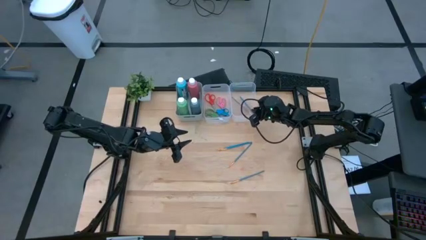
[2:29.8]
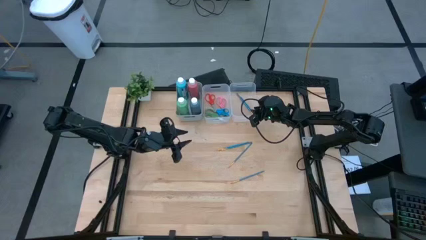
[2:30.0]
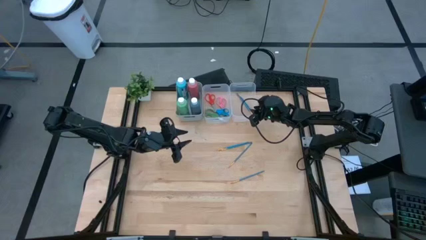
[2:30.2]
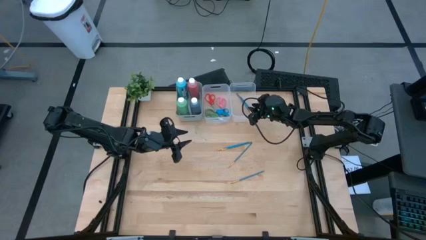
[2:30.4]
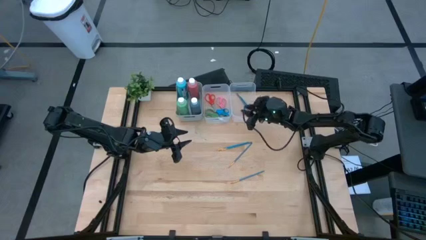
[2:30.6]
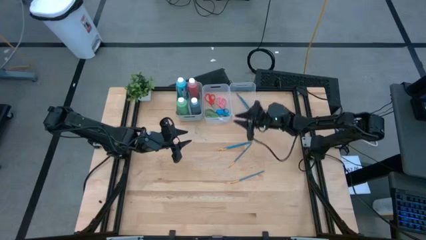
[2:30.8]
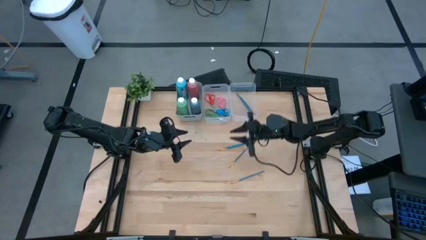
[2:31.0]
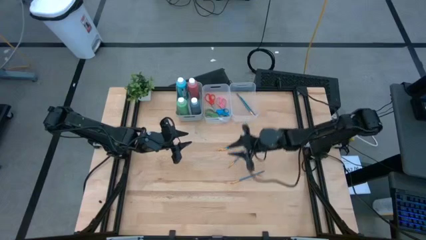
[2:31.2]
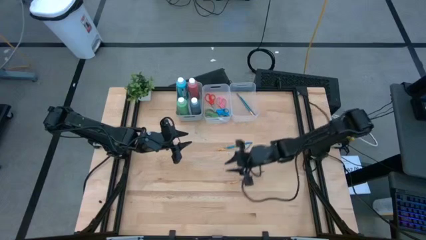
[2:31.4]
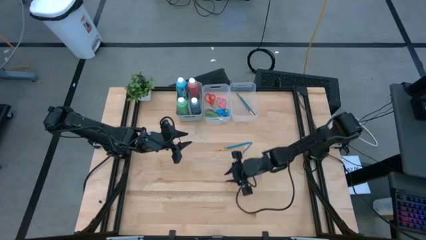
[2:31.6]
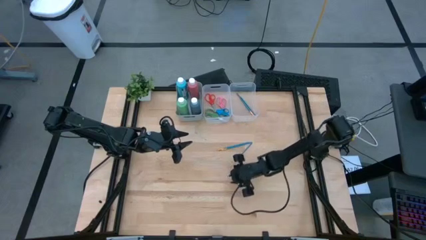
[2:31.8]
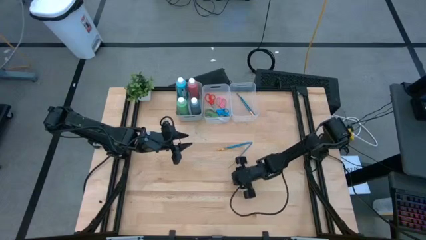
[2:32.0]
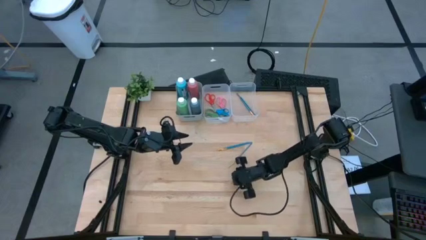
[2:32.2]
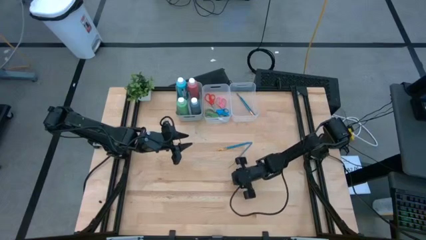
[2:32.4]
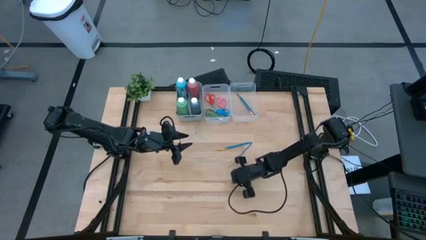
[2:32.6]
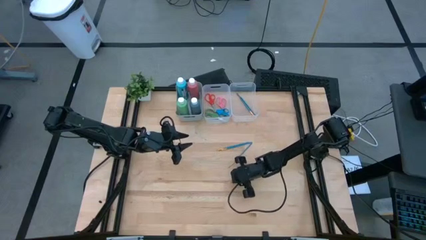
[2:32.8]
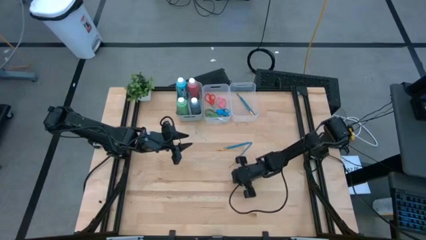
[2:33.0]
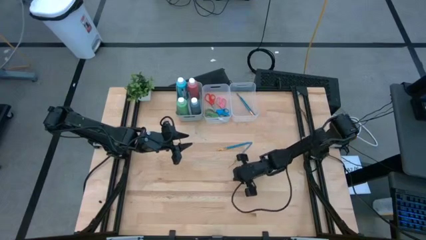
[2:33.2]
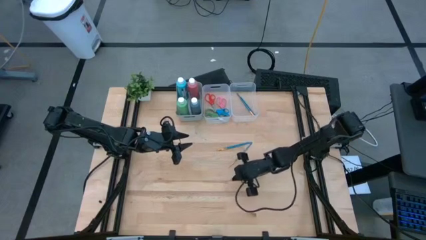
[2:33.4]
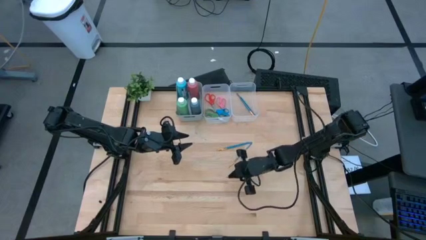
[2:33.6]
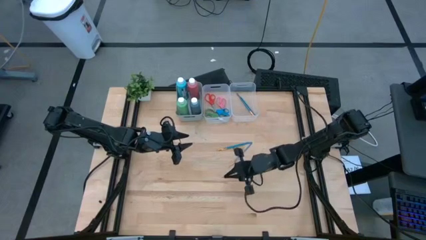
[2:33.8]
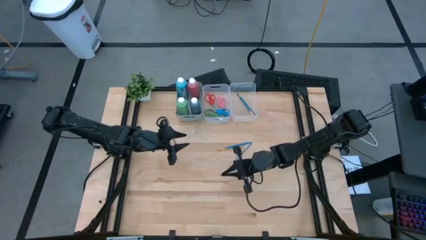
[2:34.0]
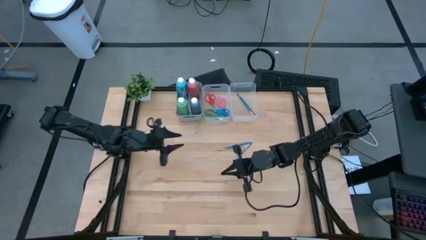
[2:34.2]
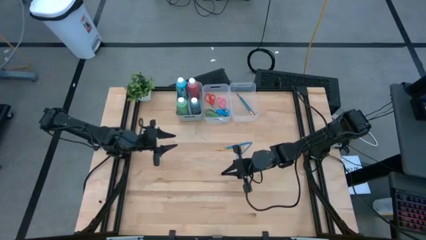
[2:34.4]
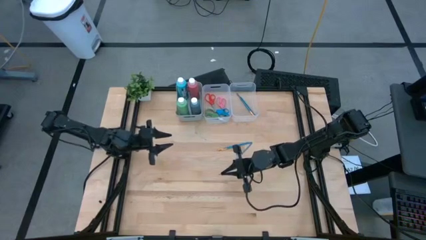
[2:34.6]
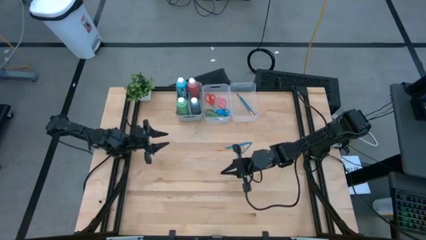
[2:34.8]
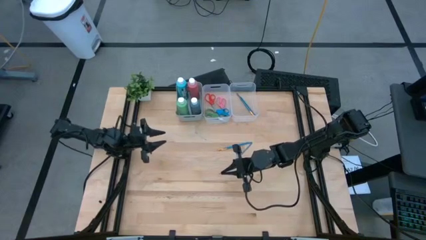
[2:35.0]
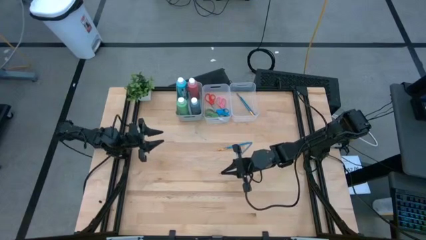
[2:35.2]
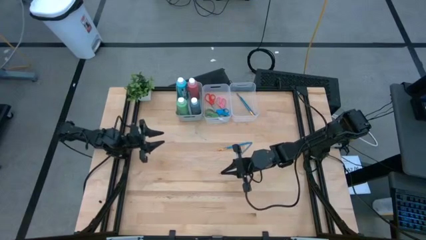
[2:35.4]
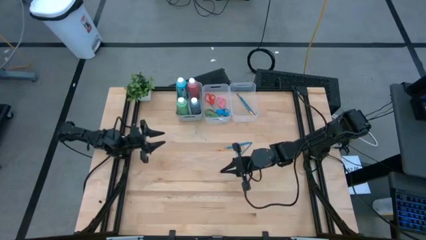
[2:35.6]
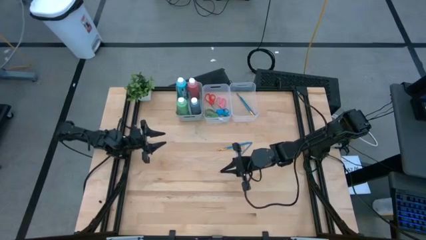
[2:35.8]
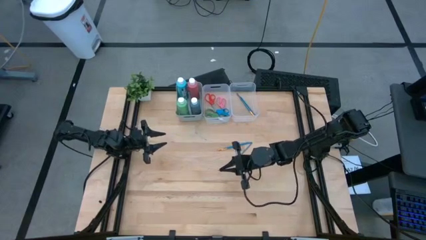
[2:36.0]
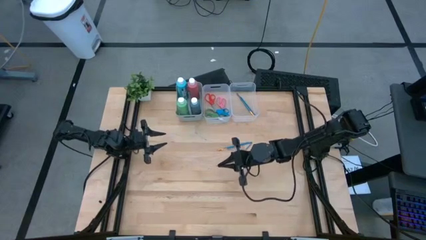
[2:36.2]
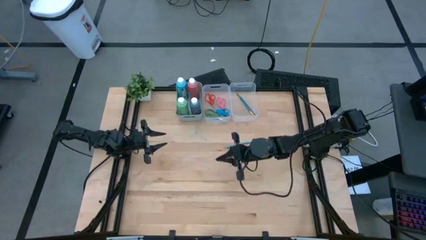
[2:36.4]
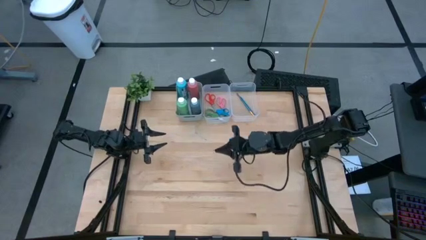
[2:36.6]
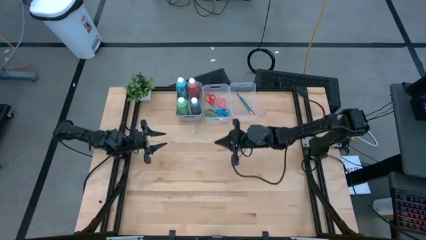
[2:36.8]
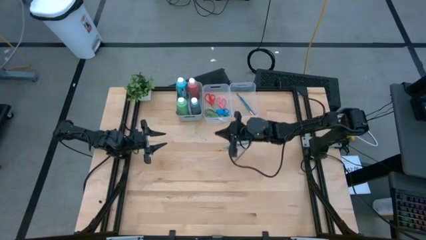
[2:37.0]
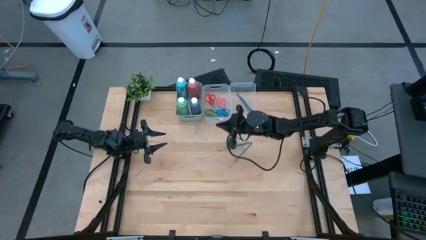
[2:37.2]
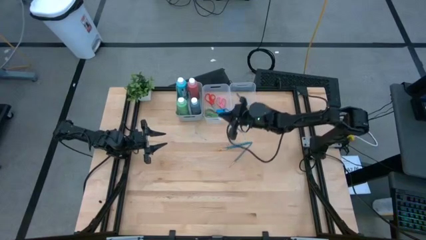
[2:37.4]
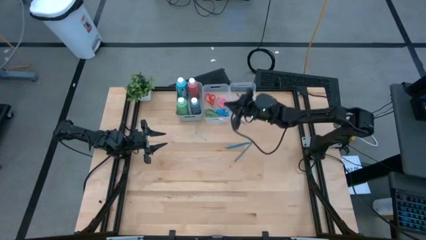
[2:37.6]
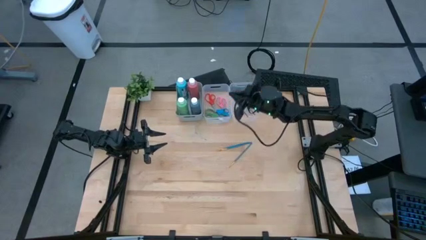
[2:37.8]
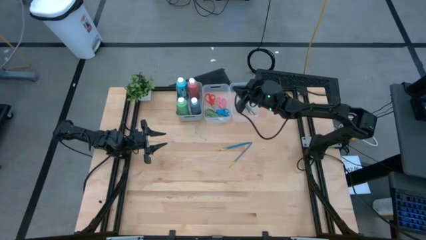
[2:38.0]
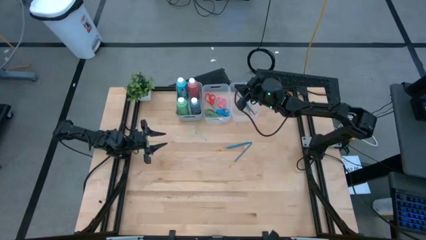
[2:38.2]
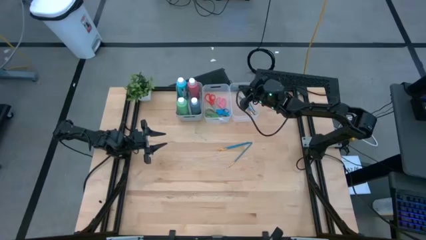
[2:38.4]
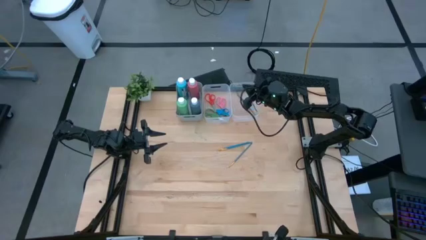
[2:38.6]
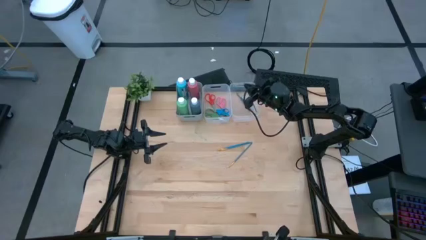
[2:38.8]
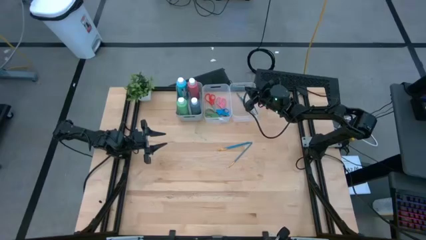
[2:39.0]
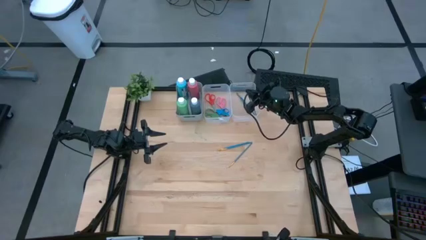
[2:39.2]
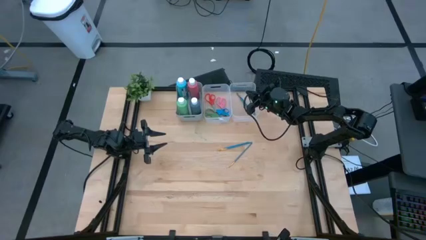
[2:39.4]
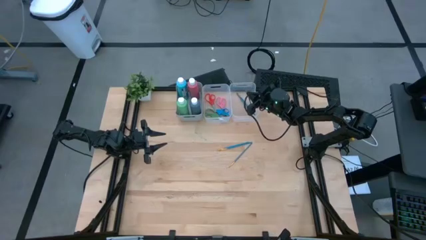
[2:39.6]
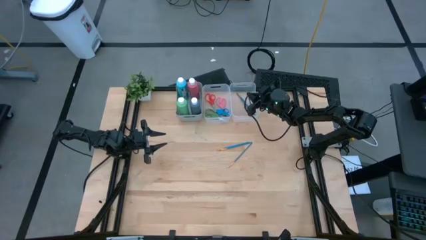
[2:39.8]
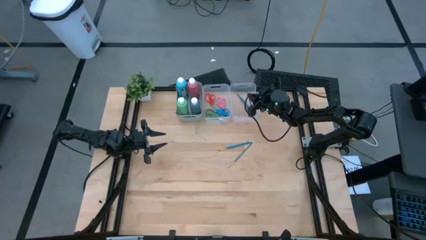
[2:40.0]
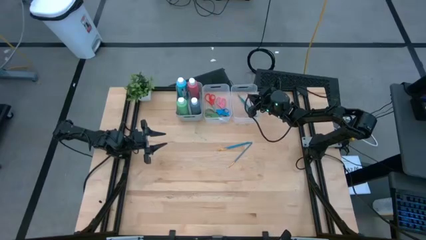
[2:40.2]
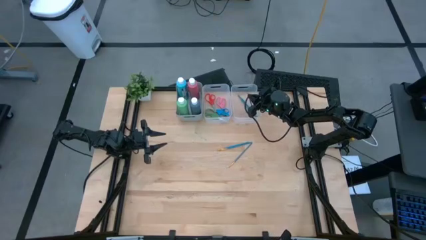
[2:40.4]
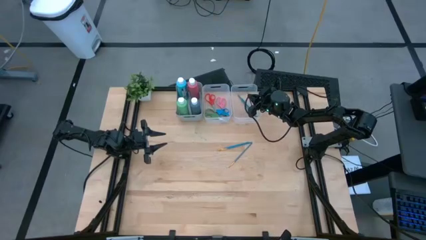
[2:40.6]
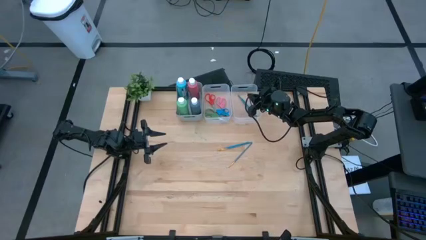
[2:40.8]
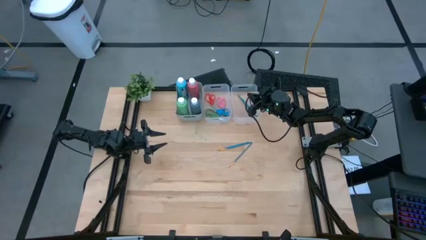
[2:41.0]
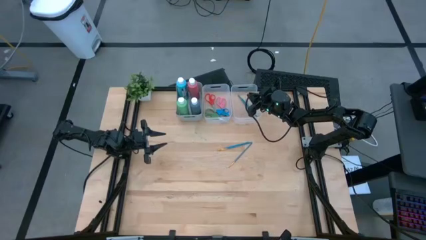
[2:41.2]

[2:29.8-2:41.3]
Task: Pick & Place Paint Supplies
Put the blue paint brush into the right transparent bin

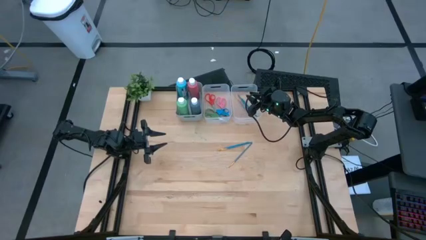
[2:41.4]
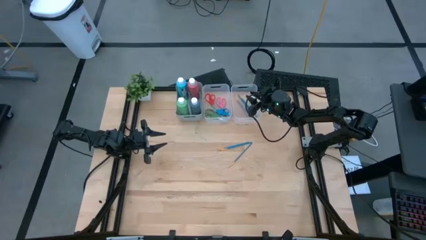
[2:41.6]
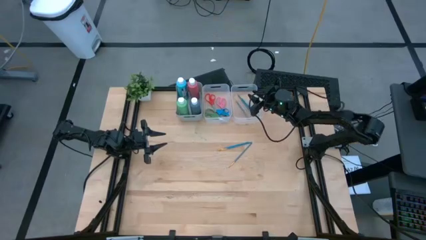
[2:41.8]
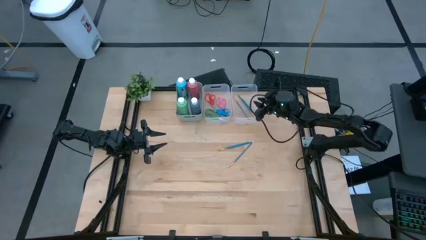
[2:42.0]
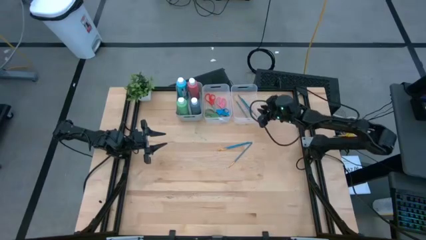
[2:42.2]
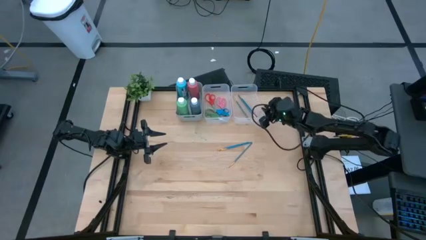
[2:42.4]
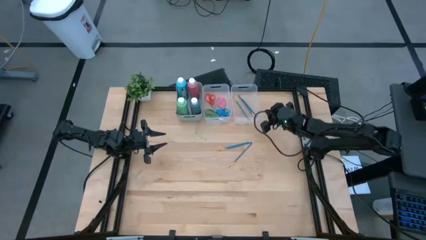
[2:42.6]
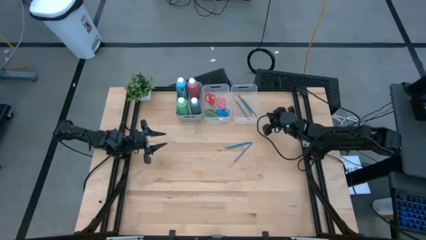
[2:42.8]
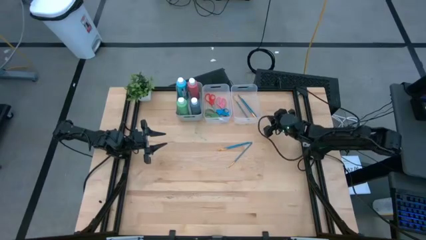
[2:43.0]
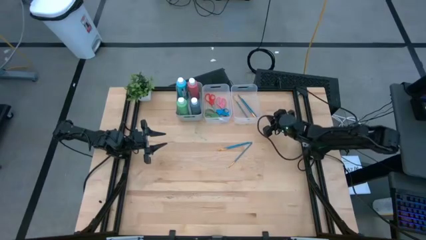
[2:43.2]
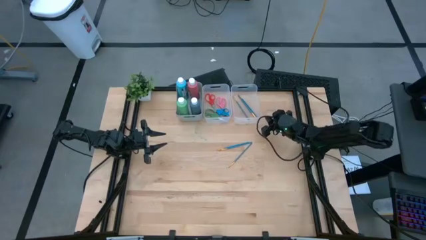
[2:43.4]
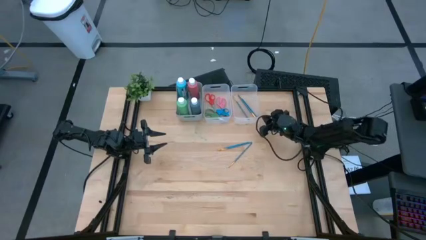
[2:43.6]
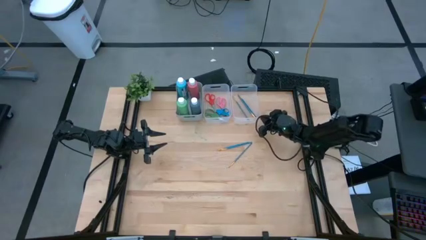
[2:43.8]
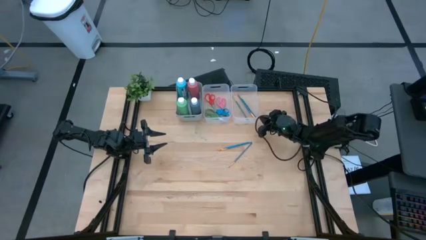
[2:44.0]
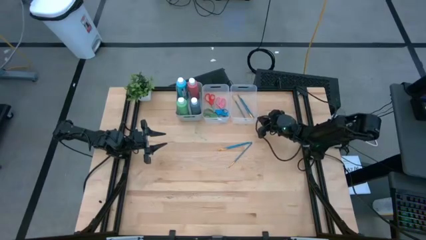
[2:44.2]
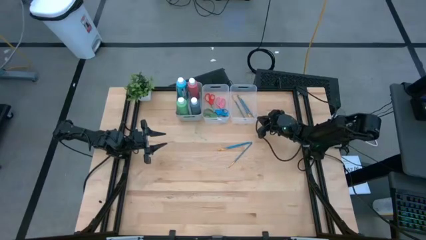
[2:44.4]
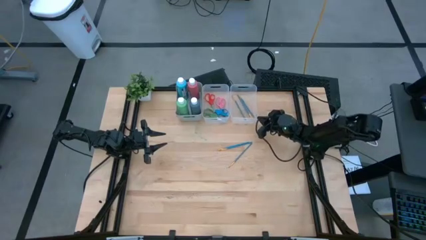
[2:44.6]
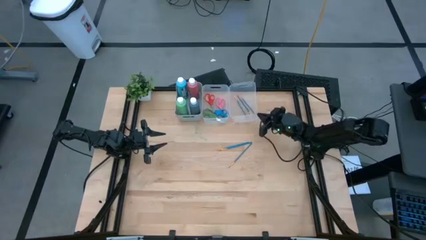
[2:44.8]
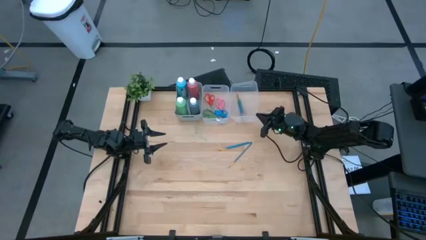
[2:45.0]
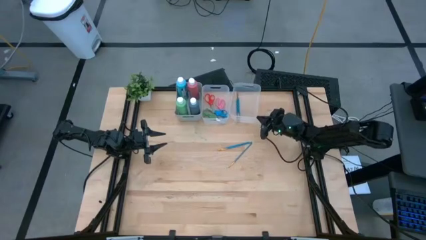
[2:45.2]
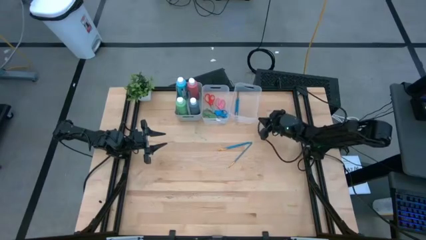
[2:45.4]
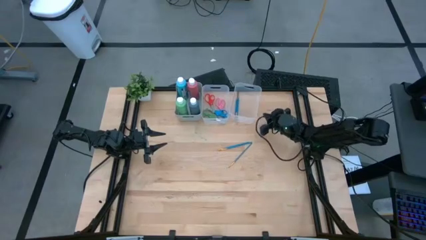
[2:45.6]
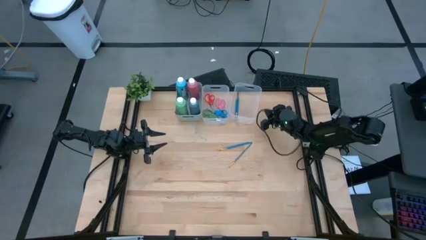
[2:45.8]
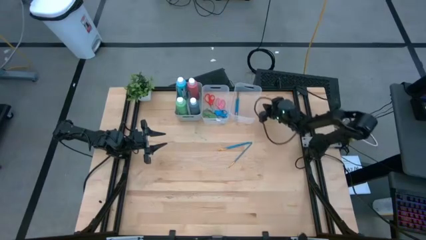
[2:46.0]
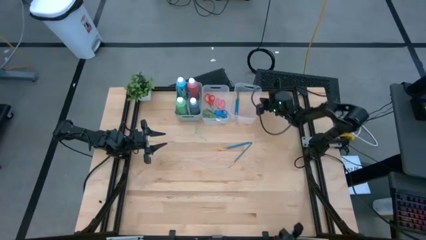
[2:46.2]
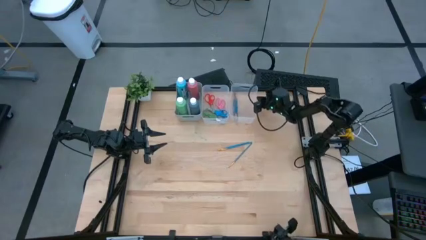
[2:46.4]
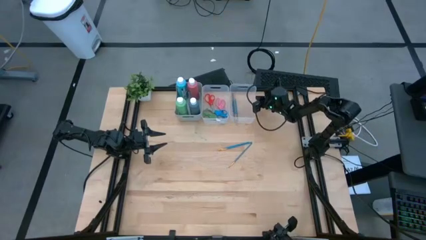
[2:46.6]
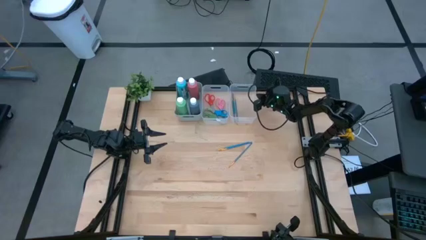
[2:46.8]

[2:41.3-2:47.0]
Adjust the right transparent bin
